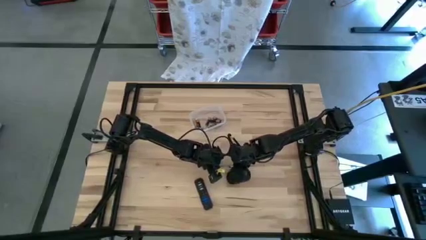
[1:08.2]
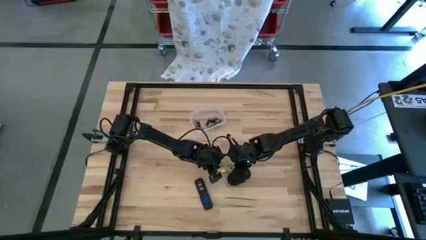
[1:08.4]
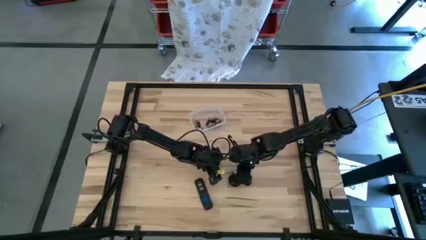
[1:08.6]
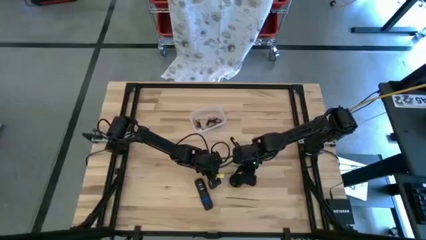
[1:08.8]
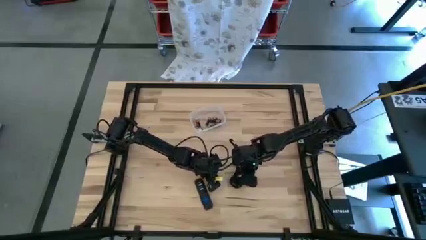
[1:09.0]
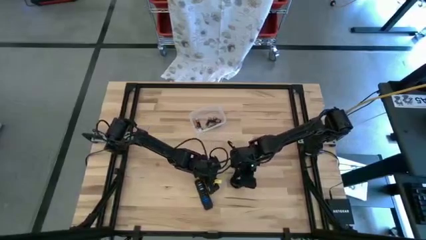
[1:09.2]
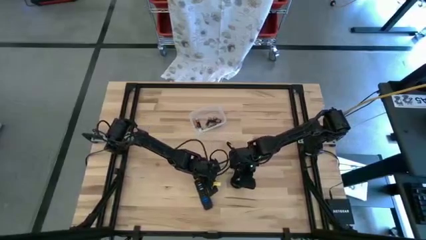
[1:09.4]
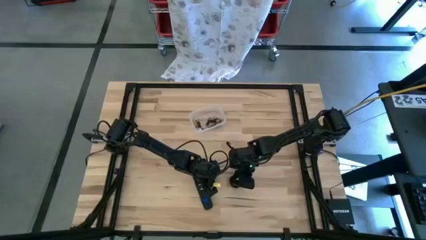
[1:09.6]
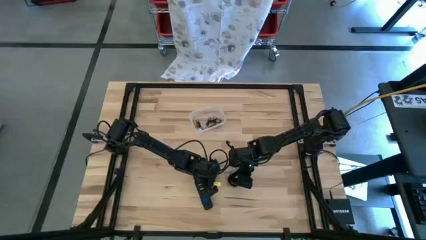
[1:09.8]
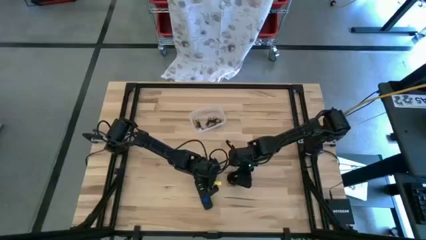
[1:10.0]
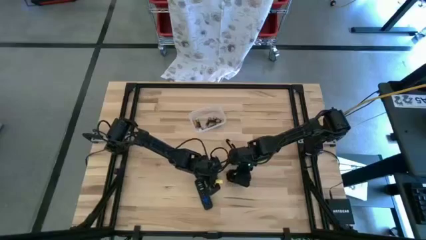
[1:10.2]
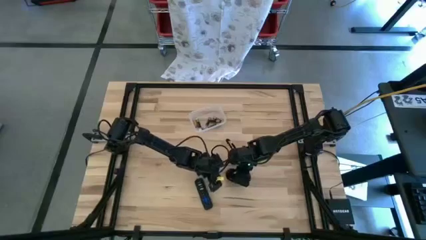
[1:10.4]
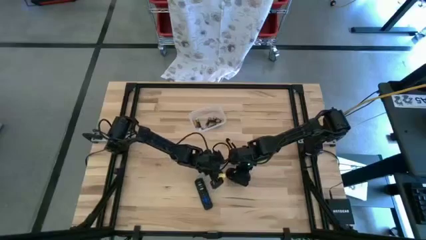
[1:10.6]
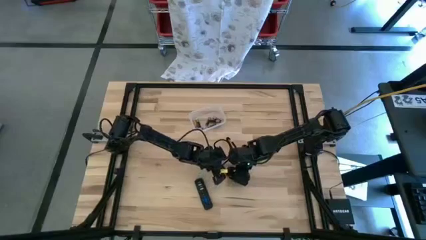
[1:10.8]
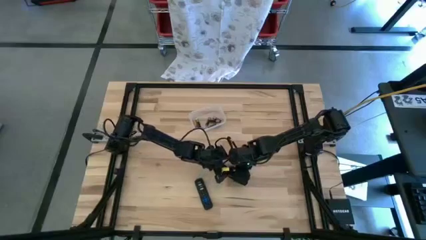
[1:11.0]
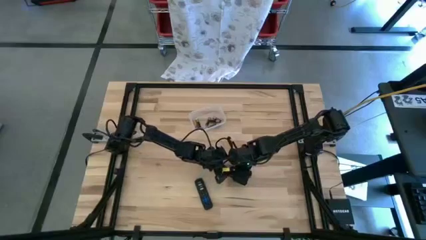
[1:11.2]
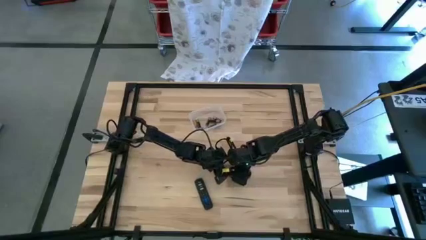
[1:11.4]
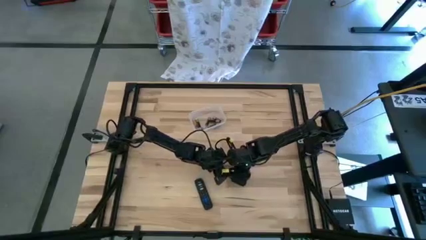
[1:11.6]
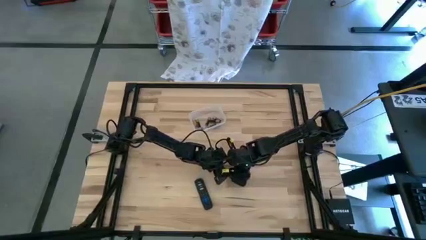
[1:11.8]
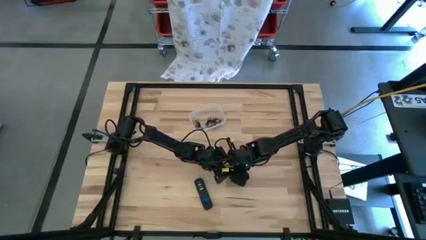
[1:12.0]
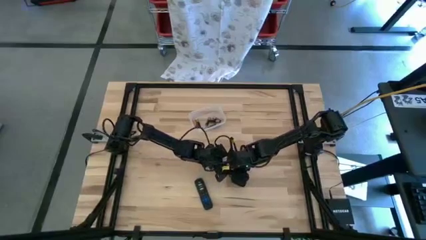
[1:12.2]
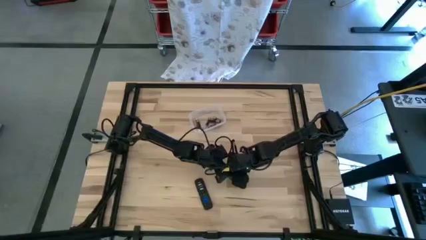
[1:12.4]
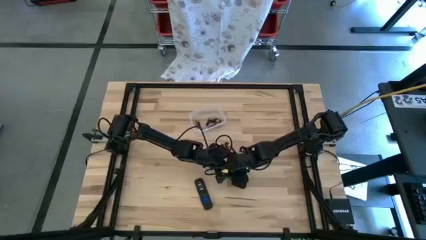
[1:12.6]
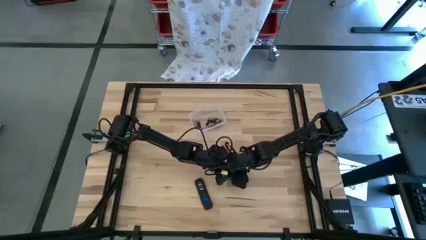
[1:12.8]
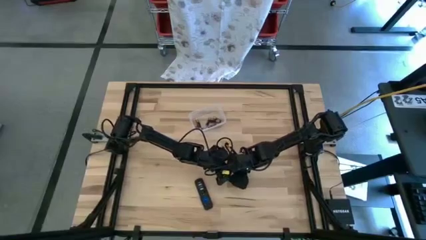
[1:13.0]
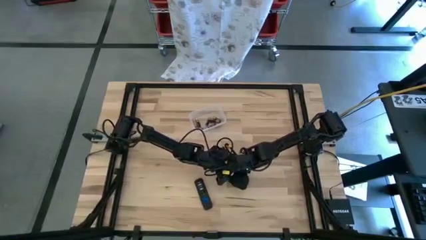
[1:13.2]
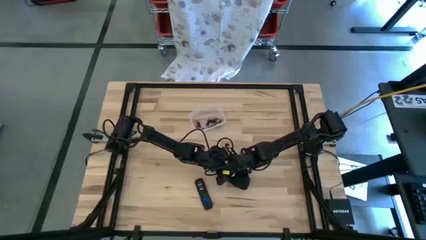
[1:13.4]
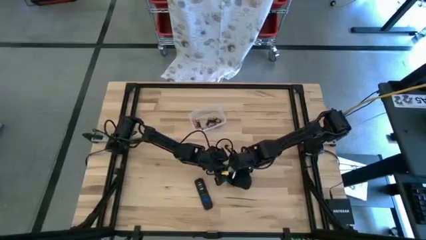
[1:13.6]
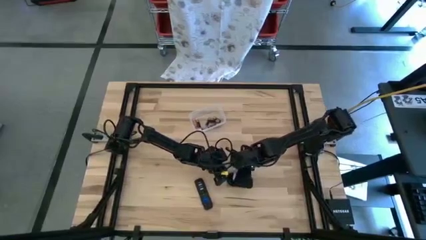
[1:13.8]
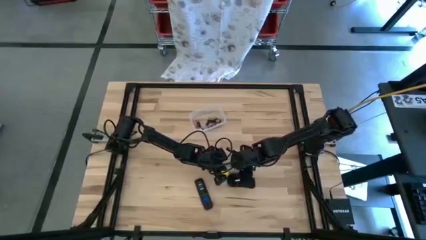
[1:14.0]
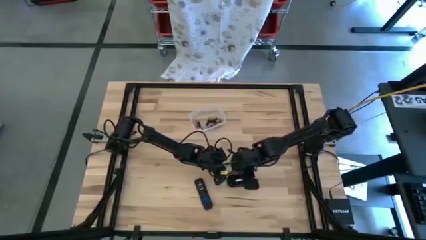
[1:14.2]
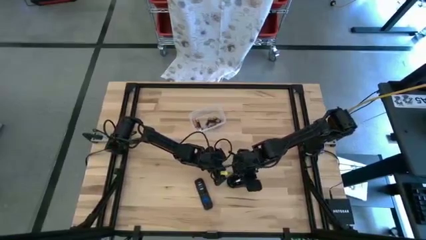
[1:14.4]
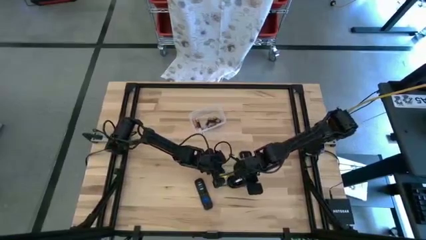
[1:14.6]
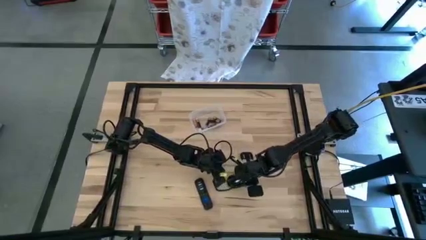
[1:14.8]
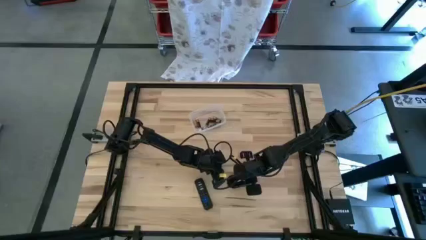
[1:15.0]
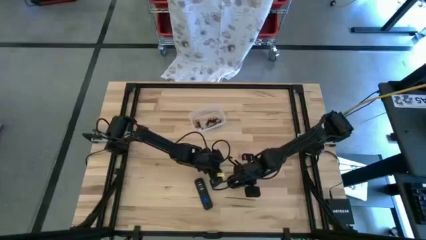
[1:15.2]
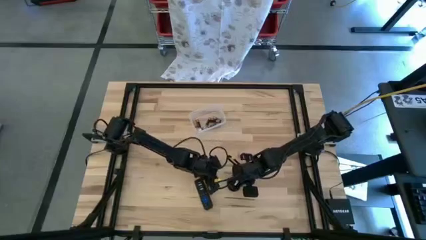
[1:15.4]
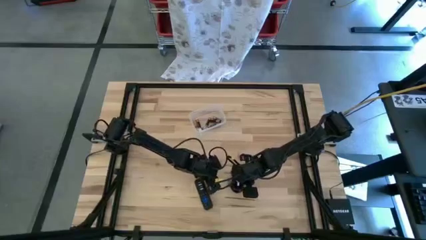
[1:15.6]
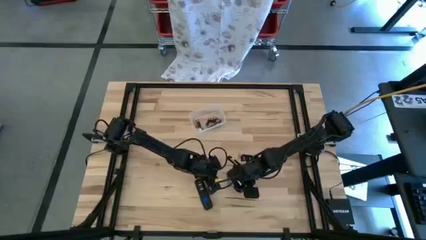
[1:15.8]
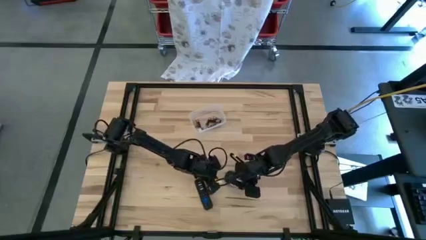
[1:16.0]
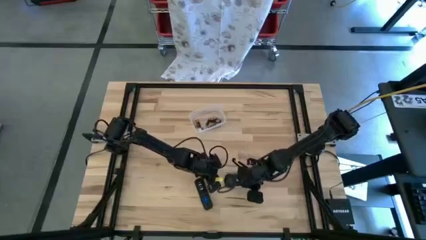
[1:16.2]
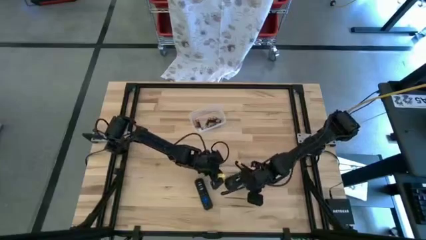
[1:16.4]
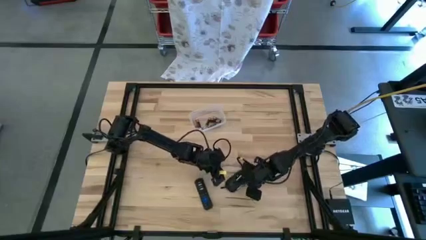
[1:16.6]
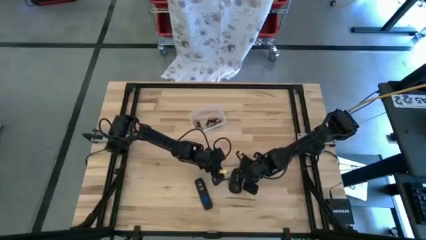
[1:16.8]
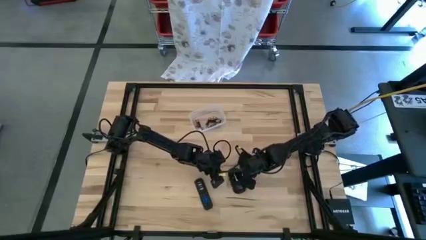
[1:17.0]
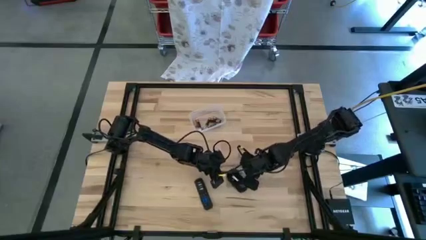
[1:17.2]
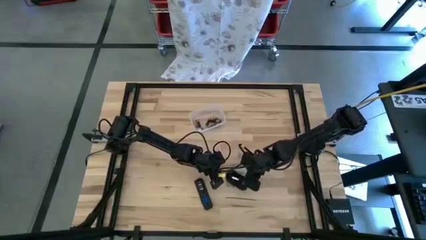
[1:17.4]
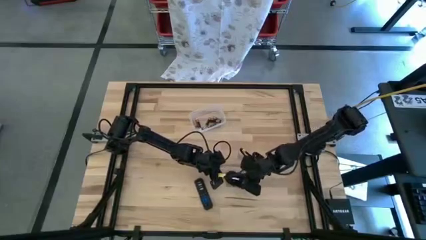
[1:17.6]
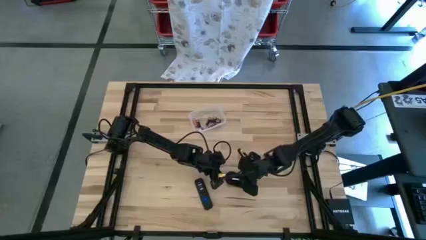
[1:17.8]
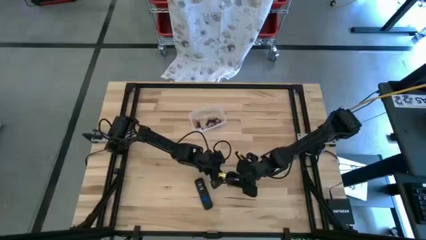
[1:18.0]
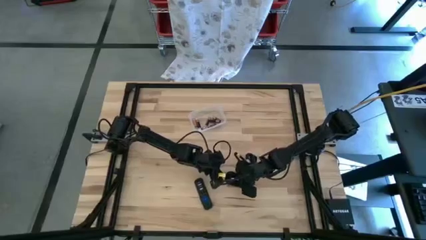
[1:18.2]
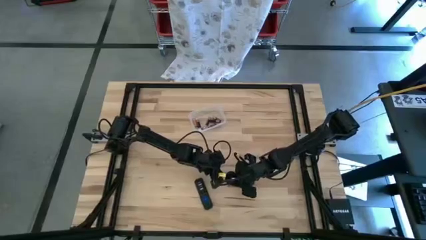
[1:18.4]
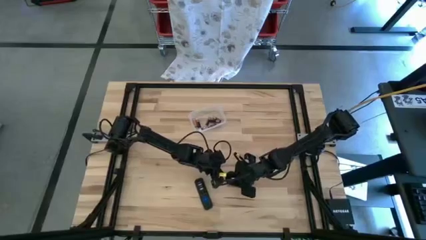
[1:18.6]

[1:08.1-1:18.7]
Task: Insert battery
Insert the silver battery into the mouse

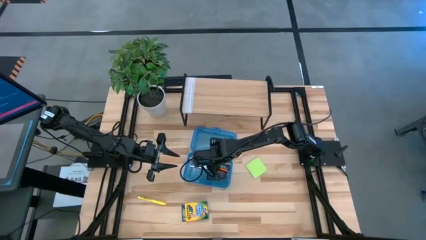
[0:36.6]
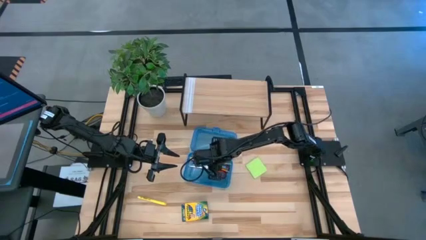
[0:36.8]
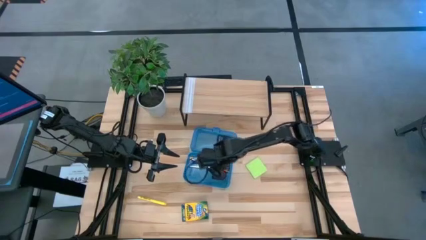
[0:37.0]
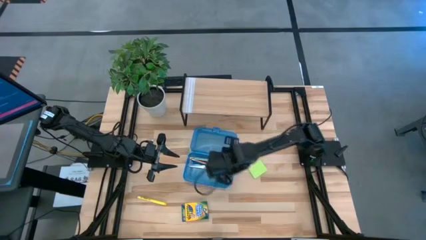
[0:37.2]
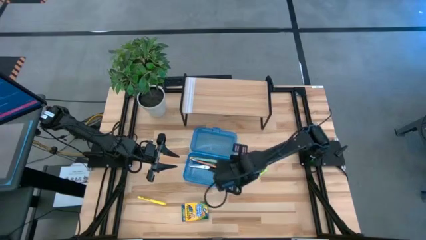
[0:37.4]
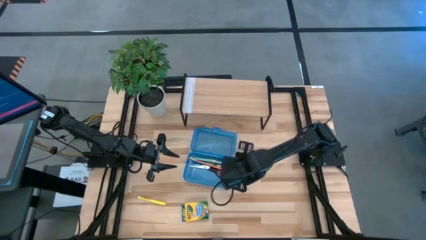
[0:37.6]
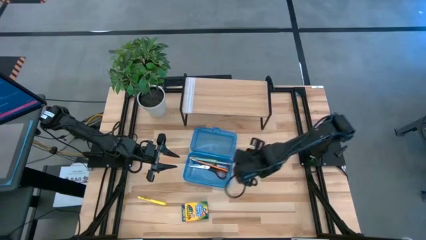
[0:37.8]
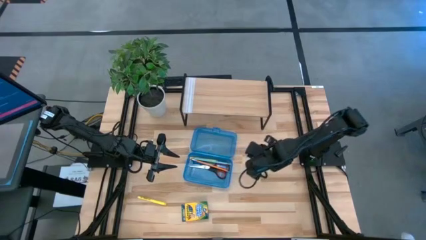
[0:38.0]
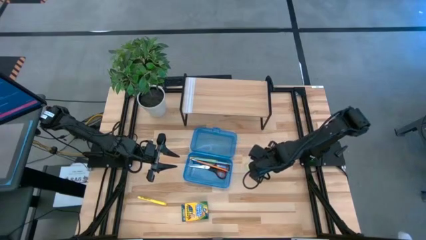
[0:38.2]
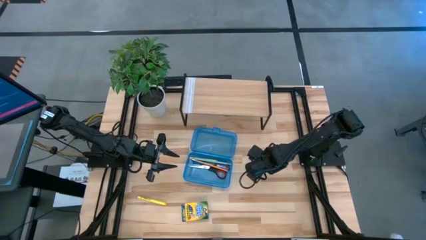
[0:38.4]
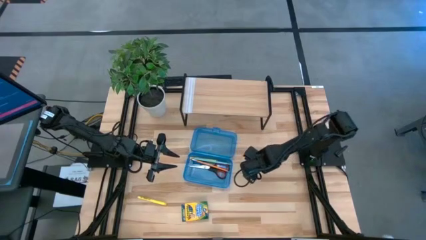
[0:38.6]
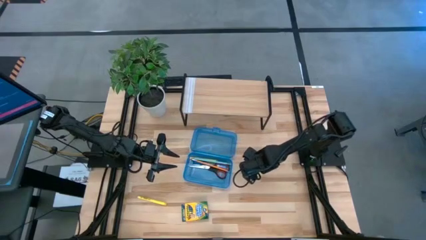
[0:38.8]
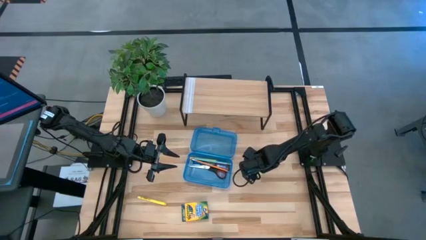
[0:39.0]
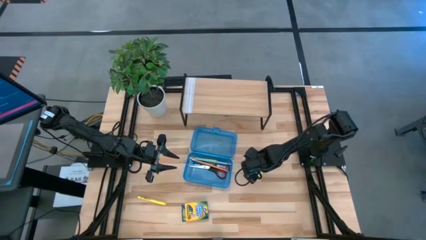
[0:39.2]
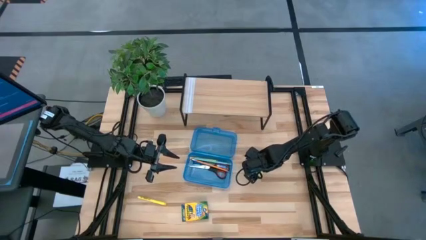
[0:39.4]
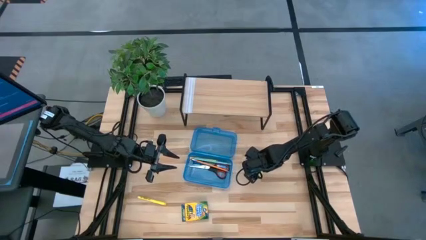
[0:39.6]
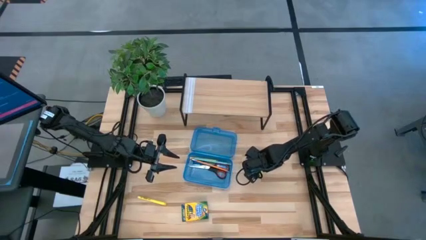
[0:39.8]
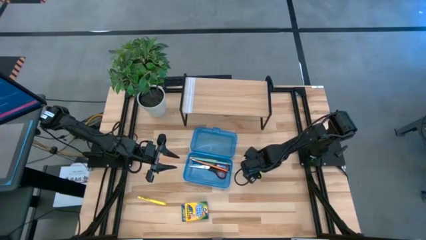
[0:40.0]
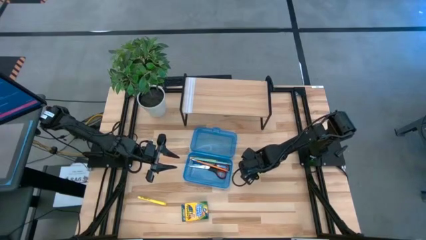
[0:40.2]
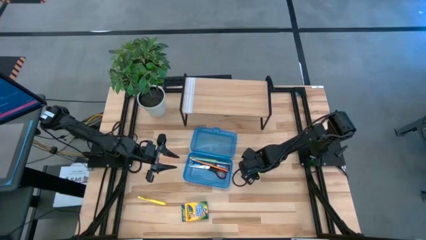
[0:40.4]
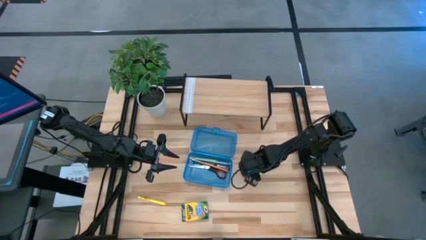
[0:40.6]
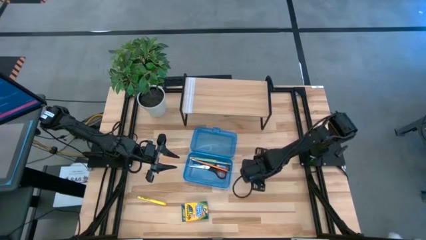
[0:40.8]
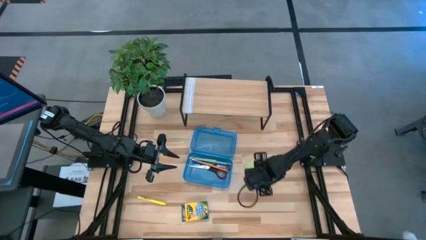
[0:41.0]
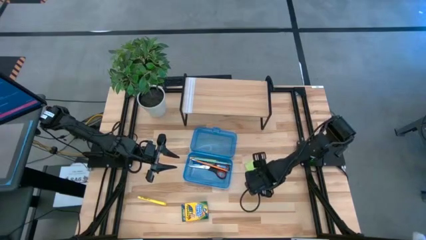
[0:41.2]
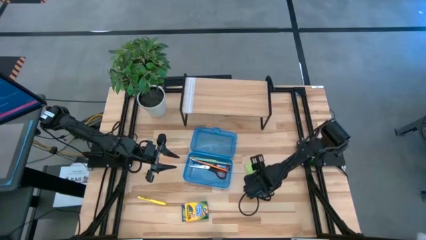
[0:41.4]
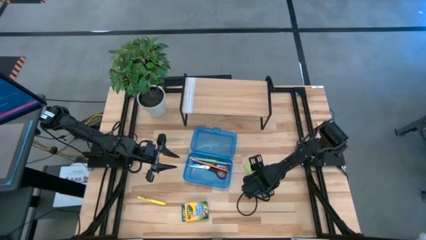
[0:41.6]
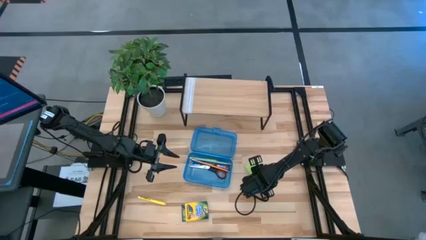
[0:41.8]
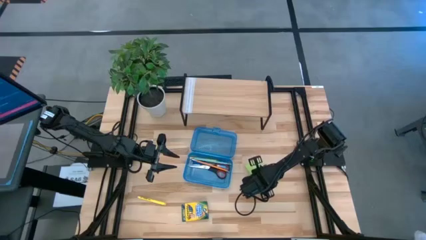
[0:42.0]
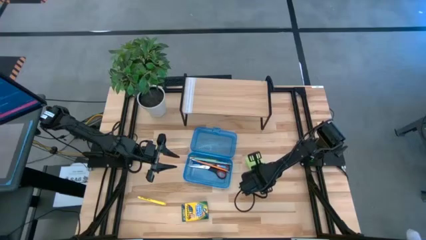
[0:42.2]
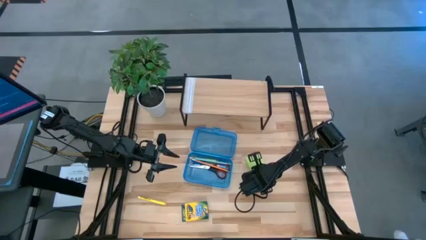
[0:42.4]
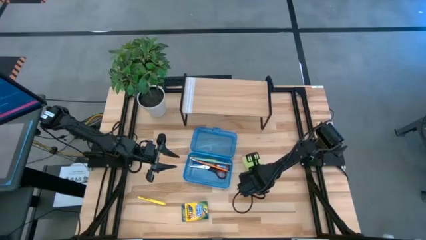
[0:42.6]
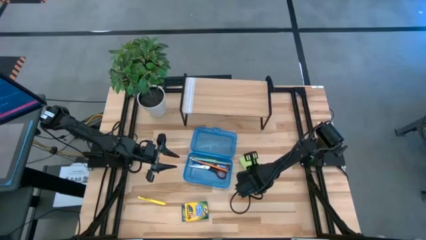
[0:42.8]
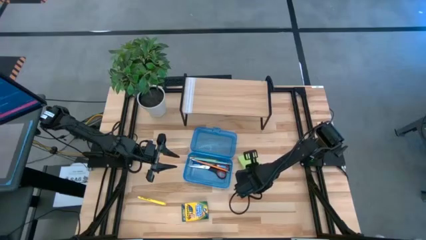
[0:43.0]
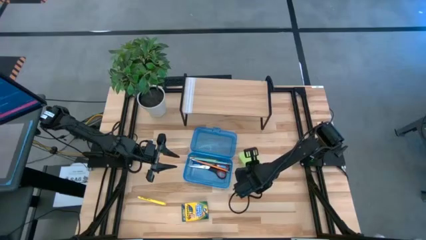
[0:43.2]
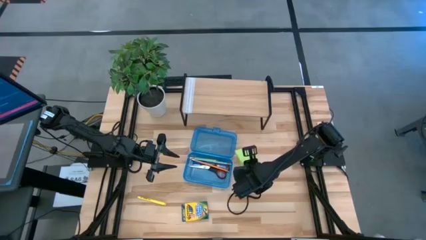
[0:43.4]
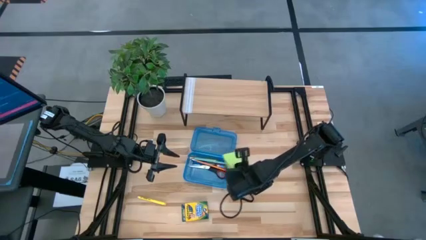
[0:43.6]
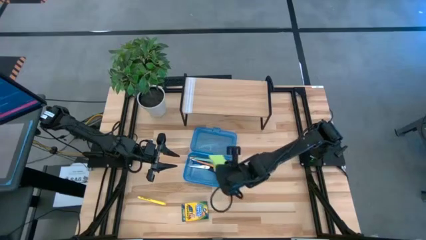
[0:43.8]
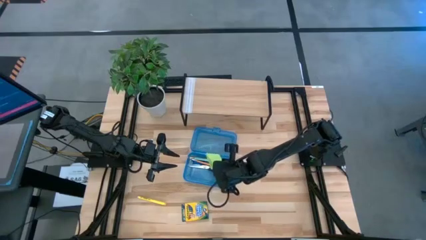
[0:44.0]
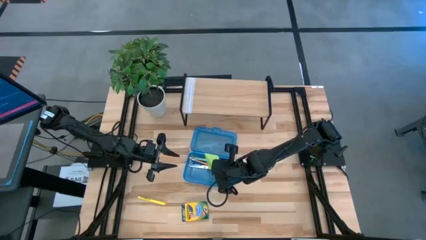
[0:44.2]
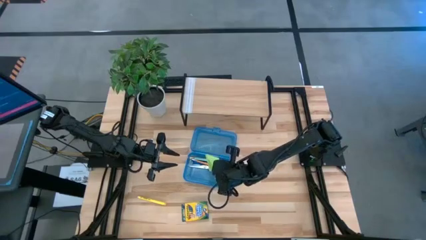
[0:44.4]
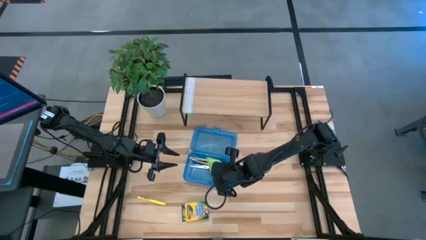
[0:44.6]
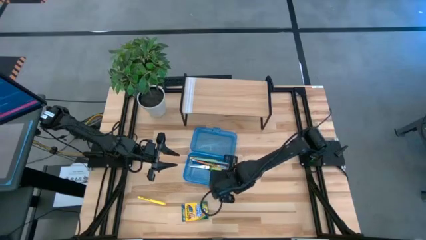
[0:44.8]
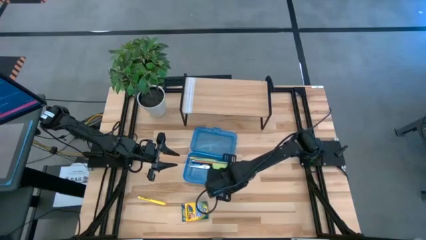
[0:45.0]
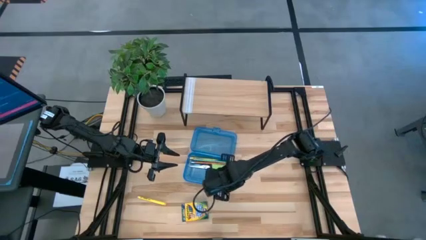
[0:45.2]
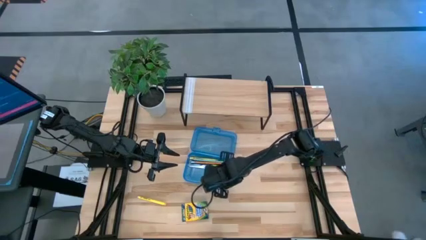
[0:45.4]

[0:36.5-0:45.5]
Task: Pack school essentials
Put the green sticky notes into the blue supply box
